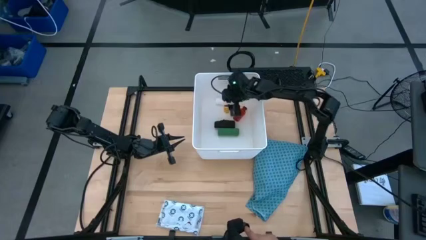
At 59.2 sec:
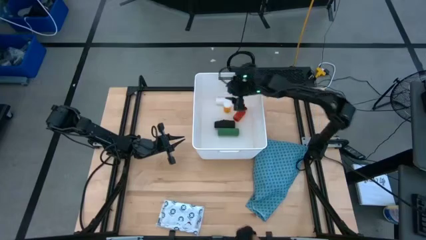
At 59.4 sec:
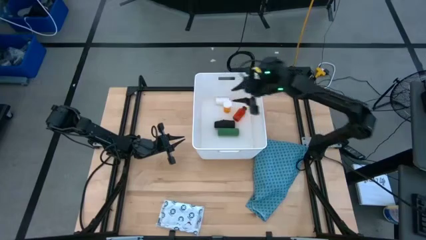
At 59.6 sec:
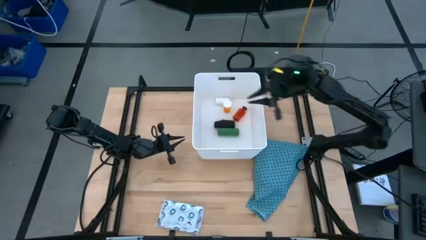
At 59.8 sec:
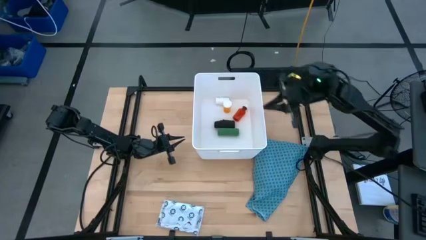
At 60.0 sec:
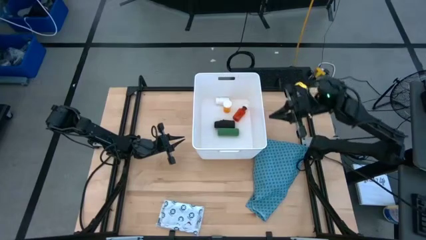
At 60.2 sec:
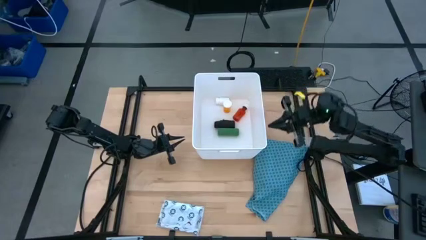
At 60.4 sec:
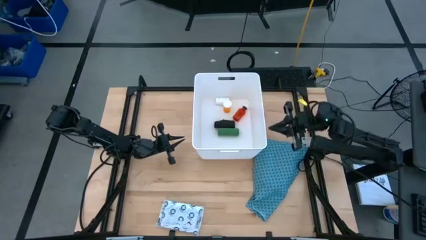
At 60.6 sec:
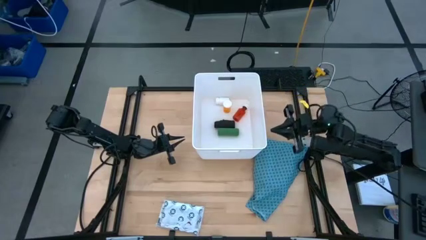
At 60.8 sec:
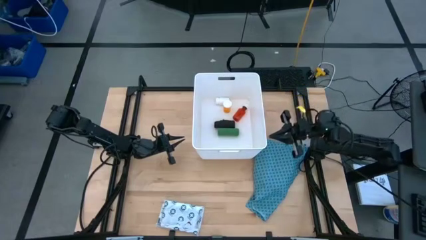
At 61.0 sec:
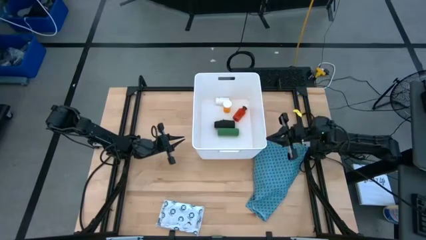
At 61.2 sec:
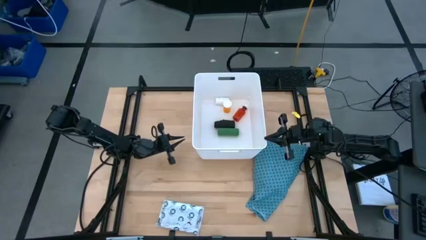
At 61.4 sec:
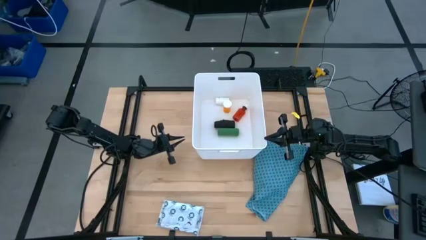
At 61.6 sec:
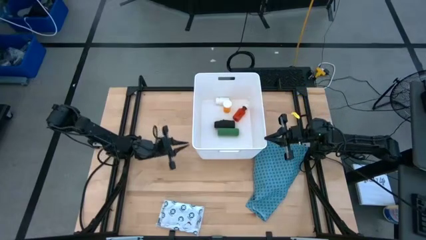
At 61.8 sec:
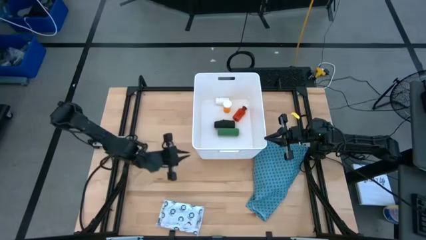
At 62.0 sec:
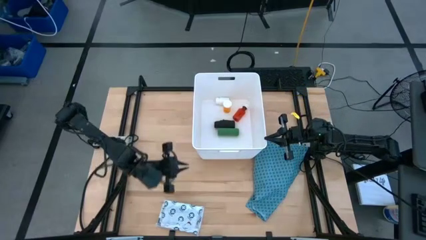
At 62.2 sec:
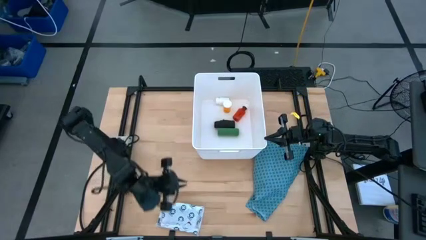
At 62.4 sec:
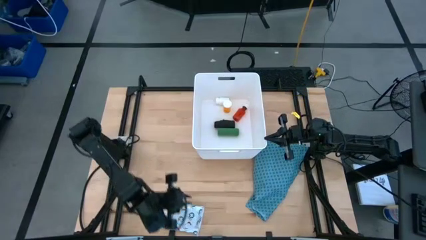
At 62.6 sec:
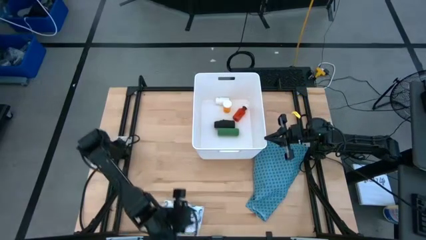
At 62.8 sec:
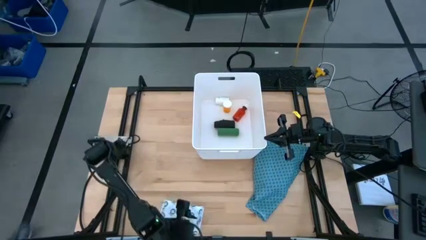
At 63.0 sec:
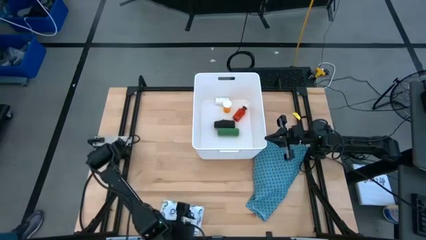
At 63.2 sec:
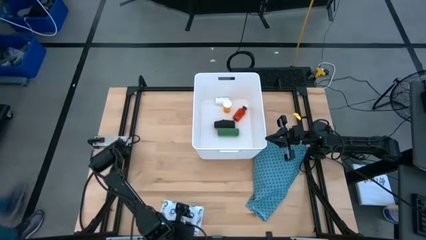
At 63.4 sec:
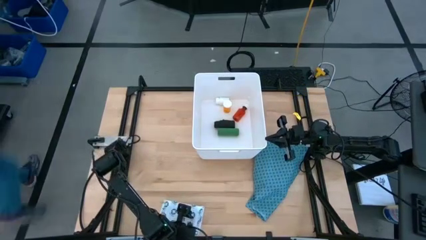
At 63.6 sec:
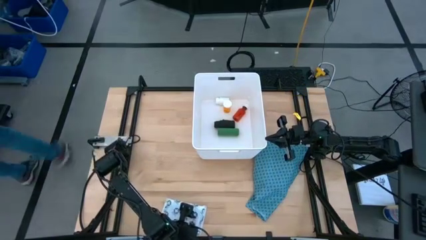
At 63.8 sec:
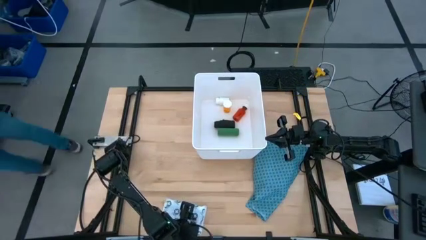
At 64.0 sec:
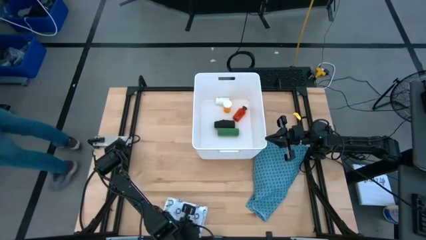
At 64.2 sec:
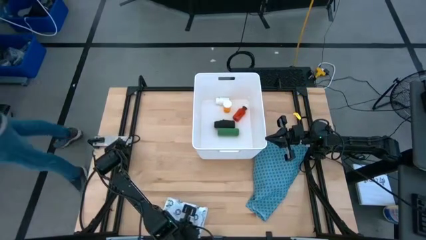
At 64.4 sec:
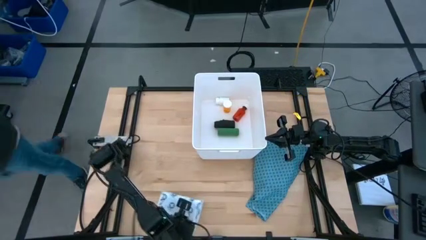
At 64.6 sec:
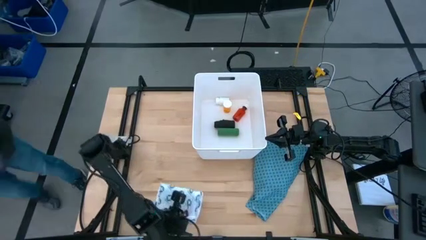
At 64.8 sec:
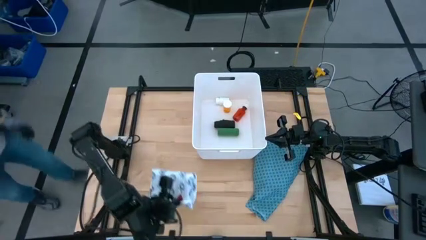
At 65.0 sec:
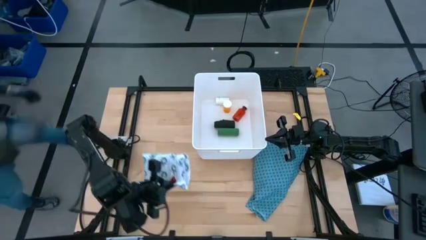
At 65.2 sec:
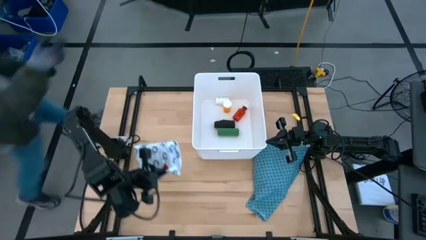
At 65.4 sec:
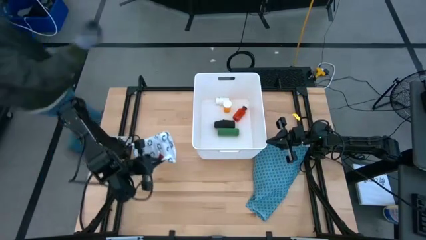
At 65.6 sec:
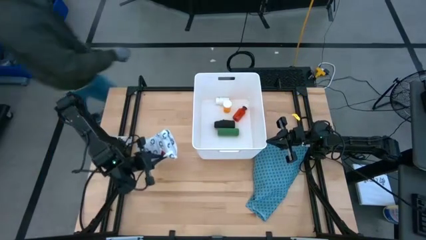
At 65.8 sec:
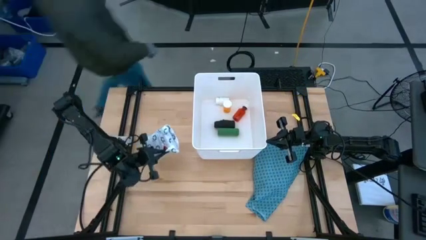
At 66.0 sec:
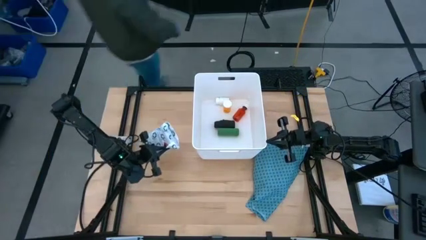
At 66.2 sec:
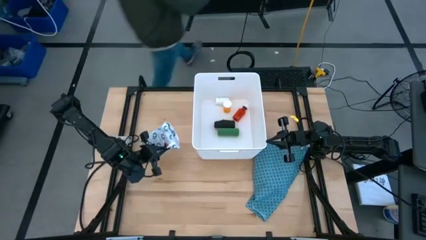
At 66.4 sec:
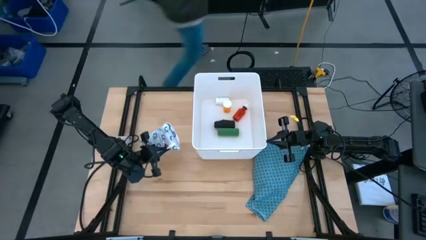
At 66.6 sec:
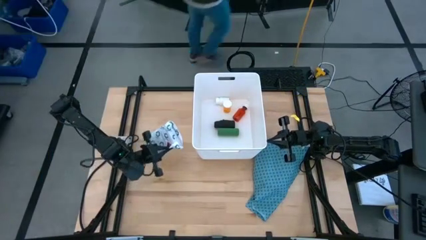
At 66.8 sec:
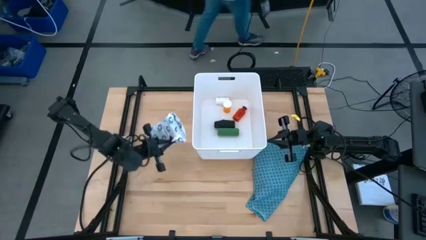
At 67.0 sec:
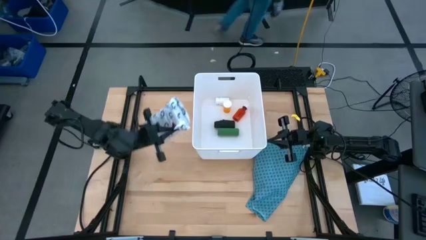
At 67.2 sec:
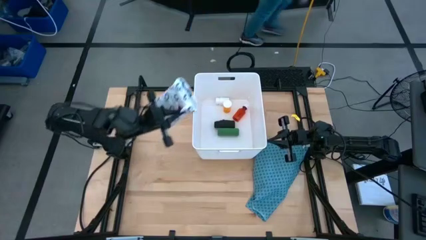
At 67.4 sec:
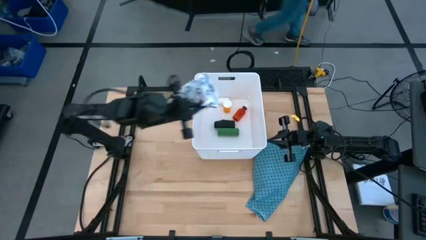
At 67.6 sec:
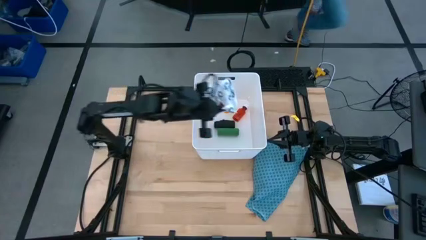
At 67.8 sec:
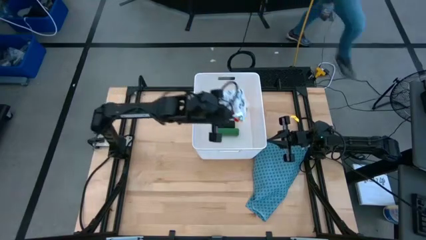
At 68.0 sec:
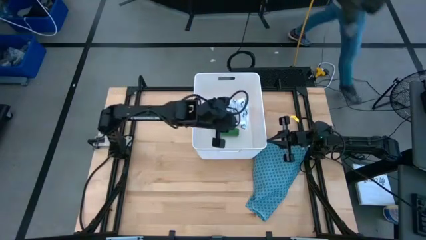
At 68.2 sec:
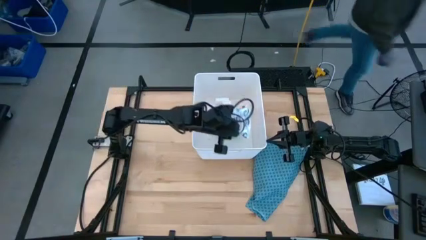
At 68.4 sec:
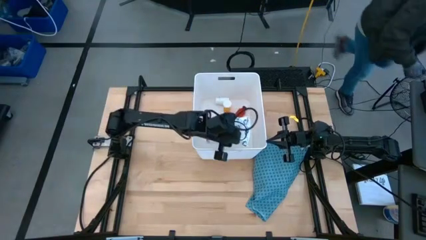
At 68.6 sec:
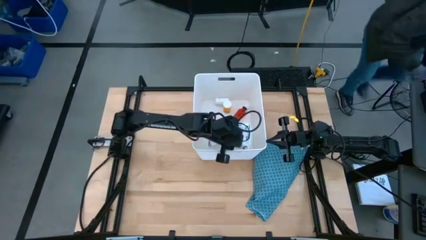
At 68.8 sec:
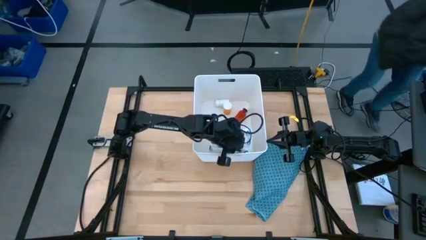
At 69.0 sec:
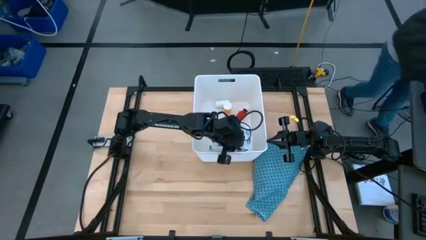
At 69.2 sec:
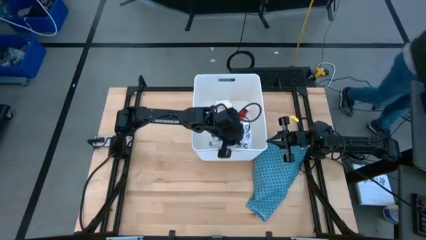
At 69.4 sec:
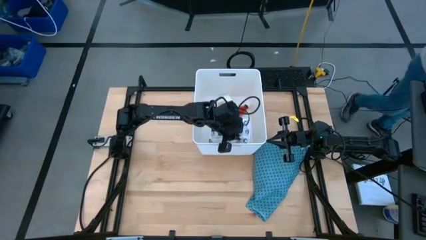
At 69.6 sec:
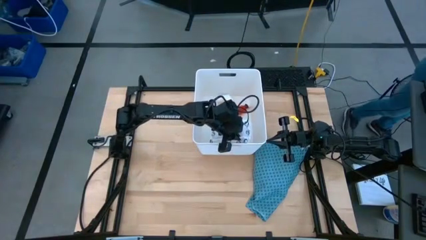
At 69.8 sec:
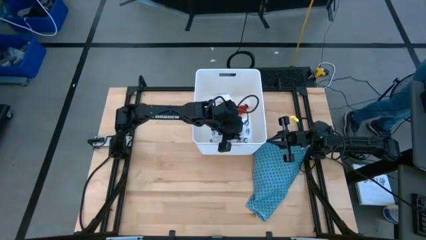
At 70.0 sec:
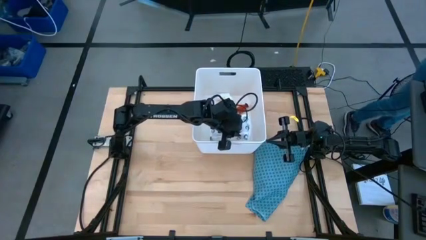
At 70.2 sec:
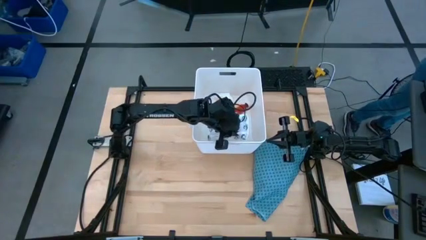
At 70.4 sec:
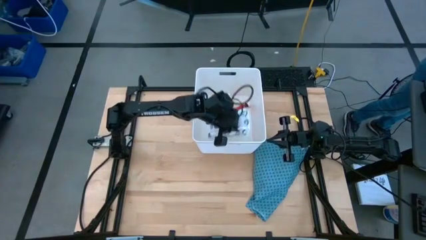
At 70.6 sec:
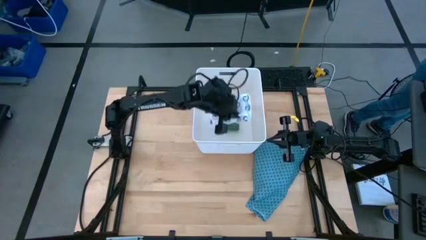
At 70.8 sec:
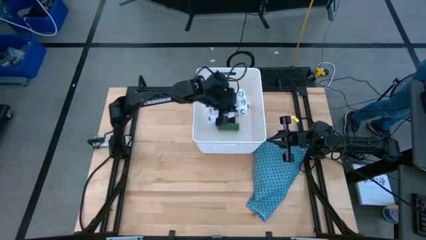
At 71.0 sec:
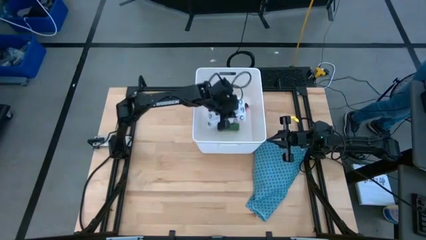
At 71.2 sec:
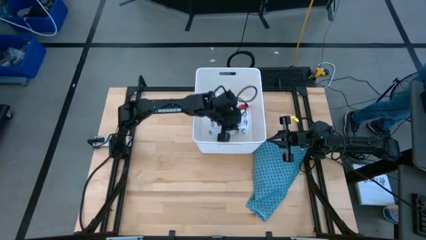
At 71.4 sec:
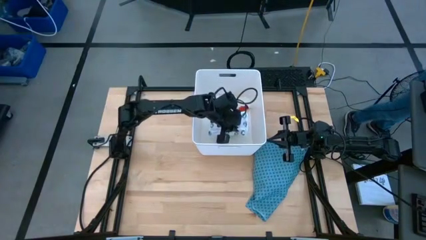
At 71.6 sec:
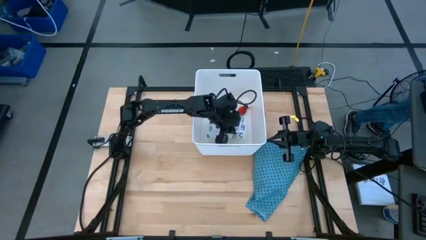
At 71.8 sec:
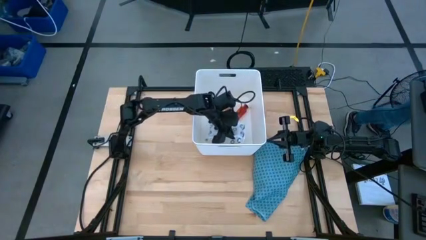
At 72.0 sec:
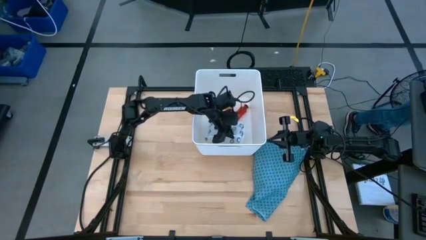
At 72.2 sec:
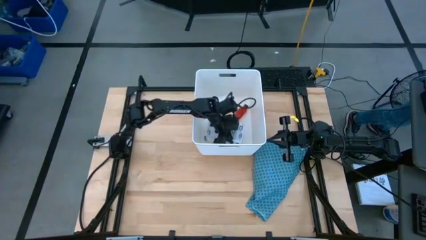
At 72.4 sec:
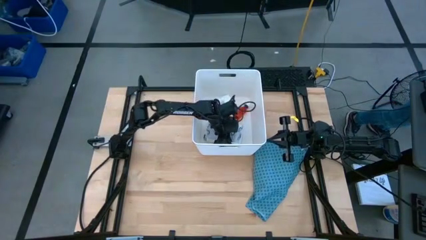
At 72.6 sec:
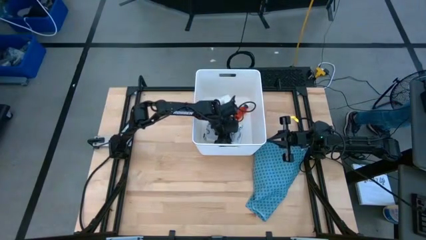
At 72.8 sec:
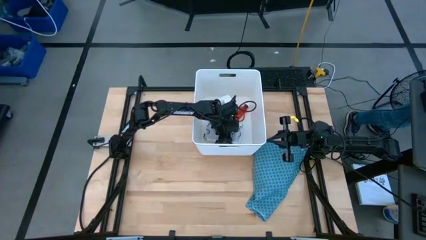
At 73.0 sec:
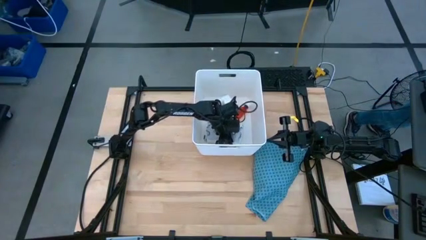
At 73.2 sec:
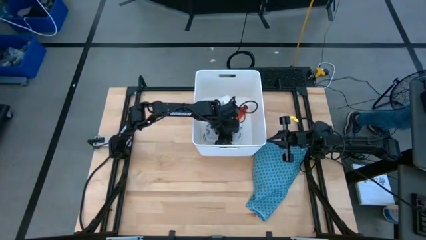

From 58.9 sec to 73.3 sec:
Task: Pick & place medical supplies in basket/bin
Put the white bag into the white bin

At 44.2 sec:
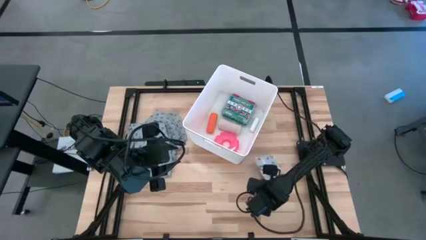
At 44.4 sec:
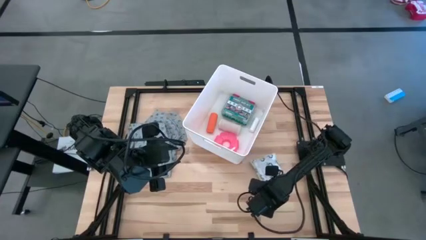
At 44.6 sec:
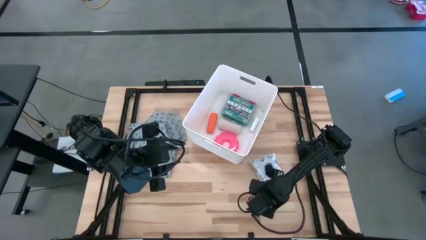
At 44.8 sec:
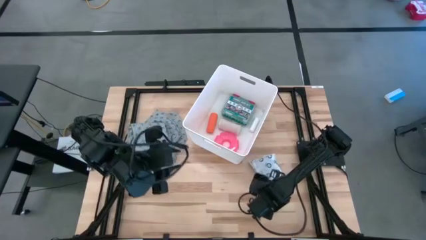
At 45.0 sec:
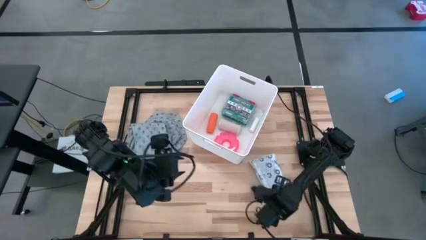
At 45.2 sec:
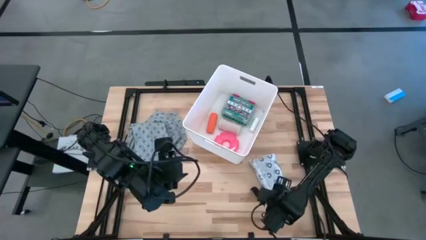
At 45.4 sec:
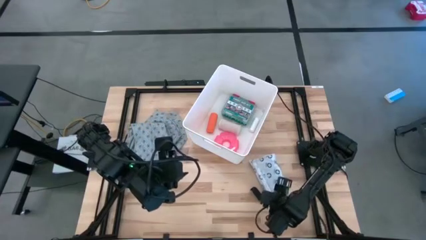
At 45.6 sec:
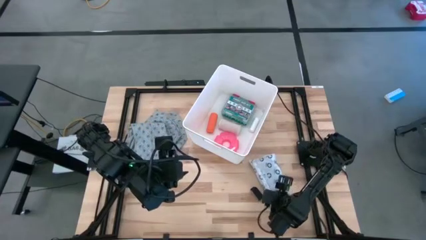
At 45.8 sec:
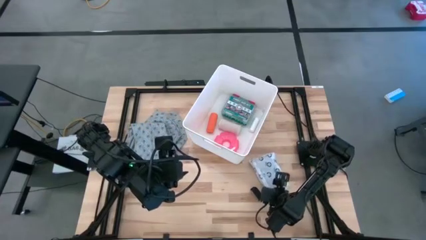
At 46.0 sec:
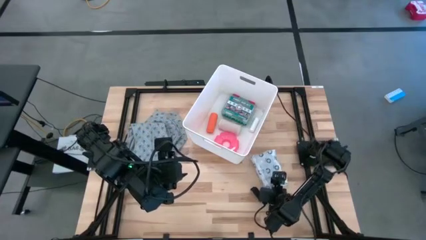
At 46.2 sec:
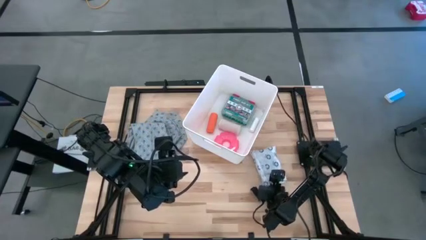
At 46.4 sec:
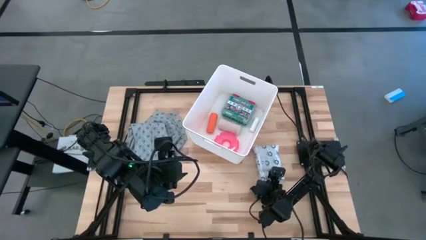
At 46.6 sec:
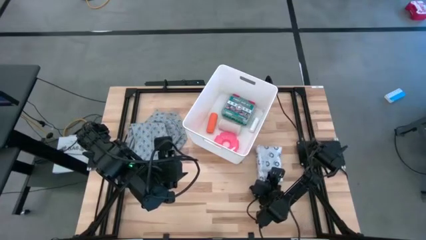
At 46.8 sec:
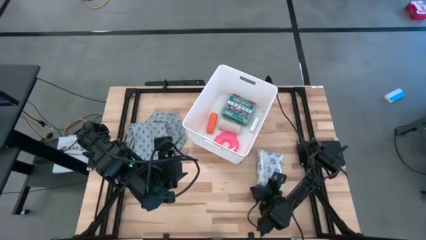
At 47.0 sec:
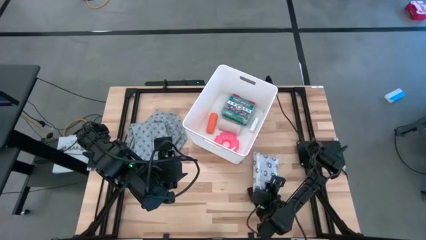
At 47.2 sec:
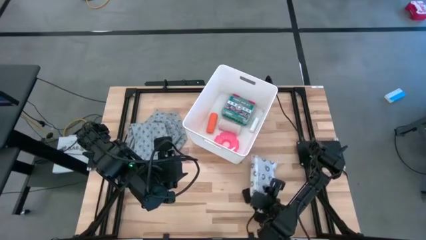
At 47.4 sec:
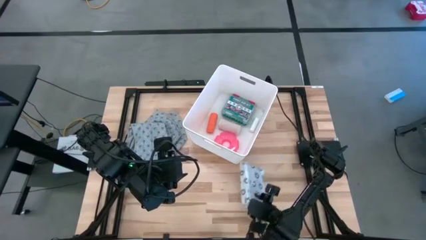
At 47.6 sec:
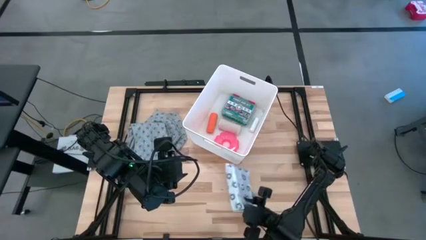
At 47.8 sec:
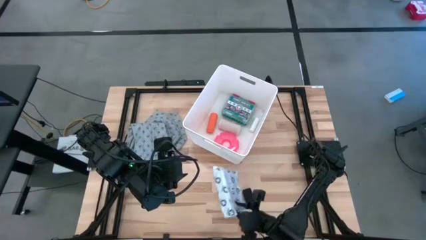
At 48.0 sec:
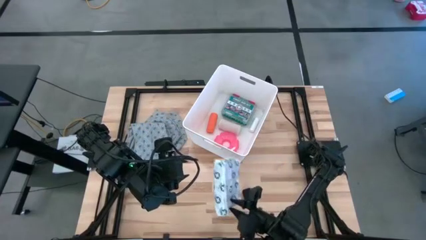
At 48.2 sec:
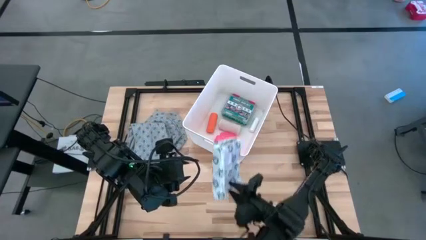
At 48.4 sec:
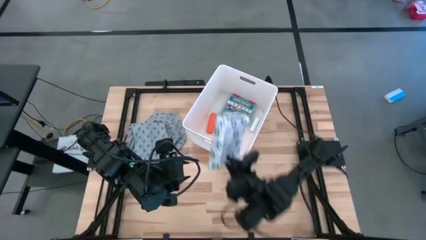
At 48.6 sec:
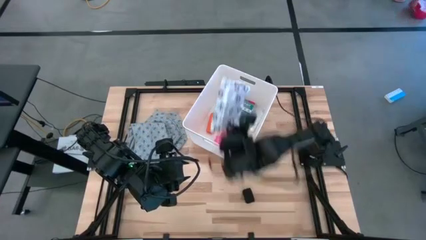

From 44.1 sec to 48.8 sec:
Task: Pick & place medical supplies in basket/bin
Put the white mailer bag into the white bin
